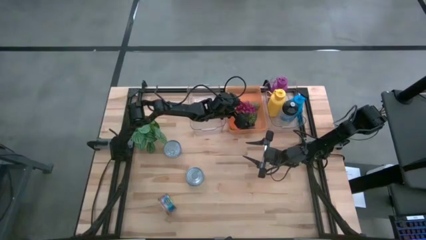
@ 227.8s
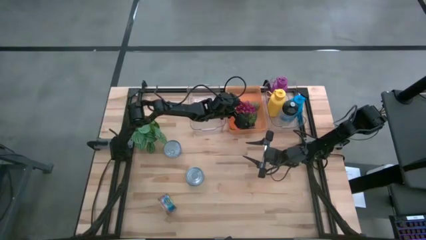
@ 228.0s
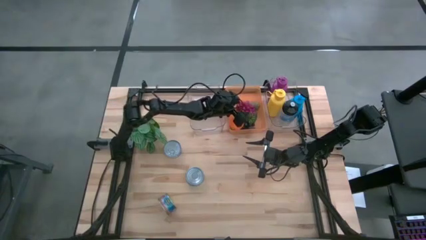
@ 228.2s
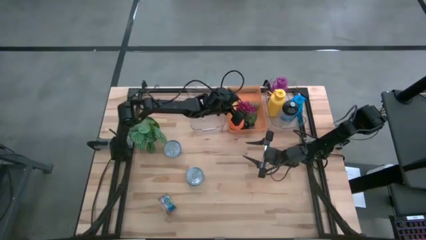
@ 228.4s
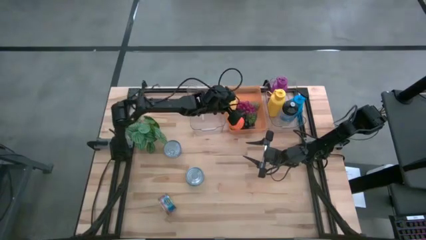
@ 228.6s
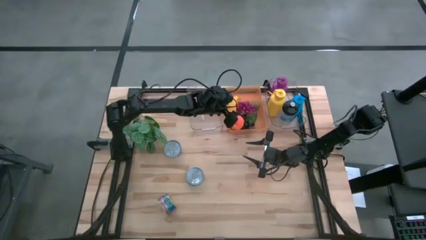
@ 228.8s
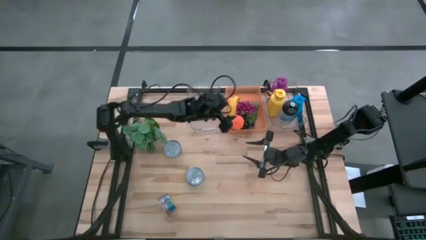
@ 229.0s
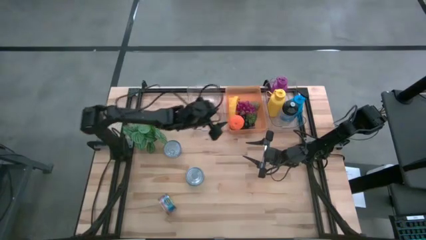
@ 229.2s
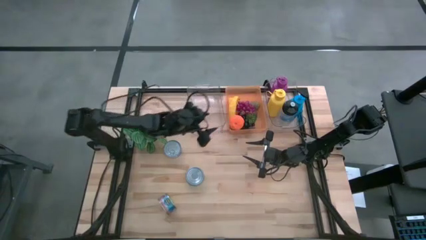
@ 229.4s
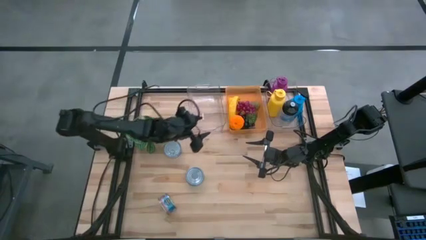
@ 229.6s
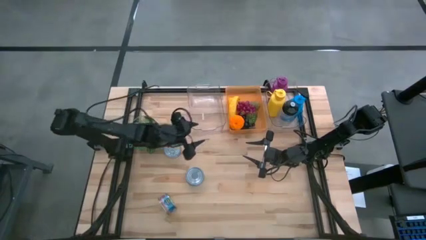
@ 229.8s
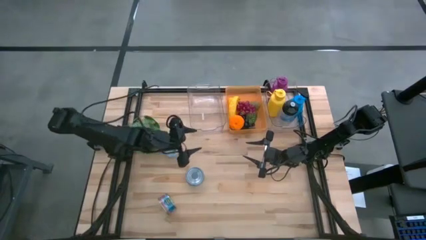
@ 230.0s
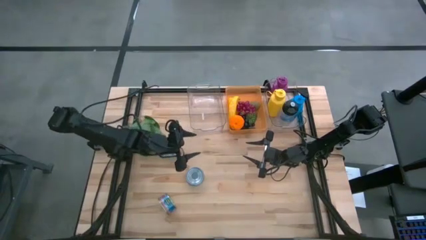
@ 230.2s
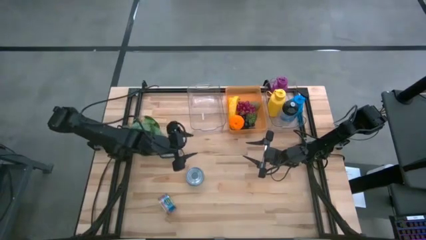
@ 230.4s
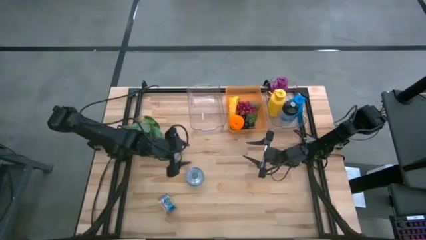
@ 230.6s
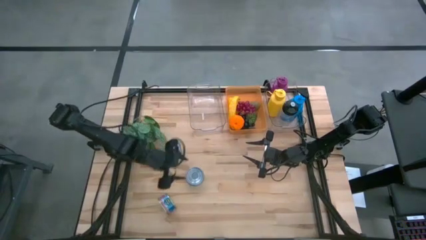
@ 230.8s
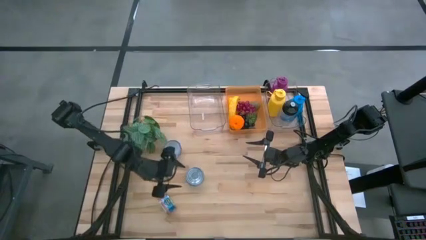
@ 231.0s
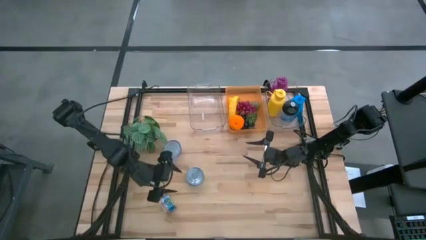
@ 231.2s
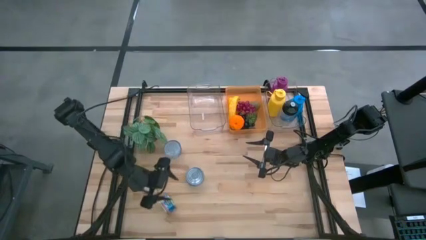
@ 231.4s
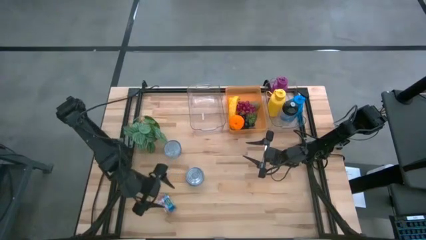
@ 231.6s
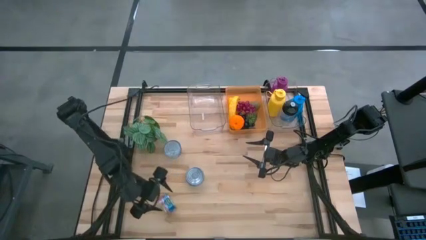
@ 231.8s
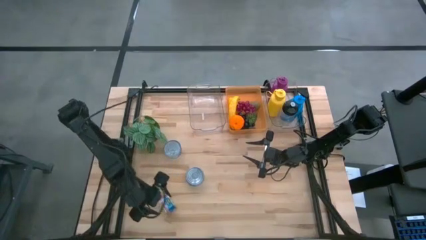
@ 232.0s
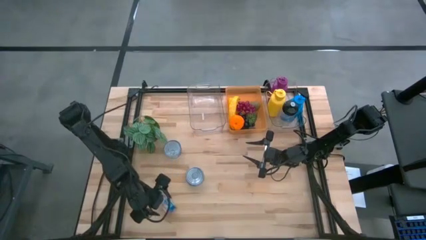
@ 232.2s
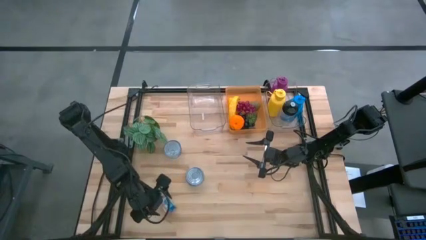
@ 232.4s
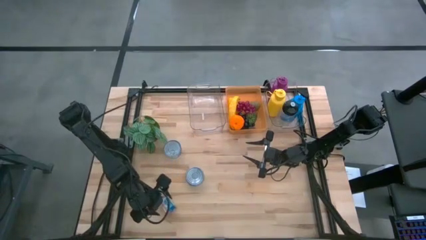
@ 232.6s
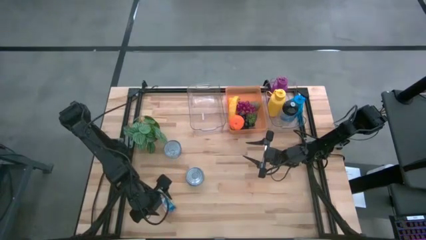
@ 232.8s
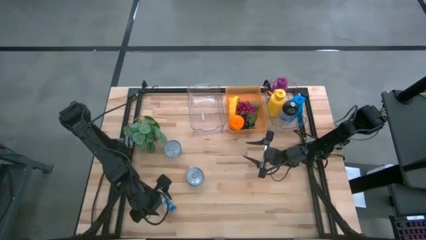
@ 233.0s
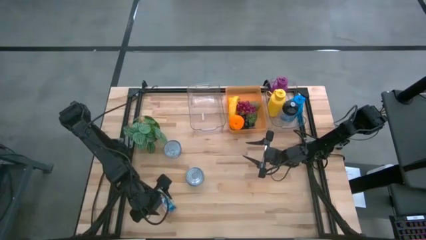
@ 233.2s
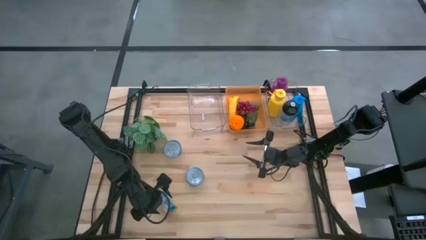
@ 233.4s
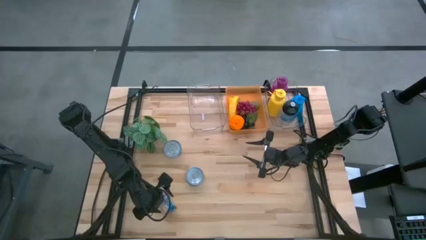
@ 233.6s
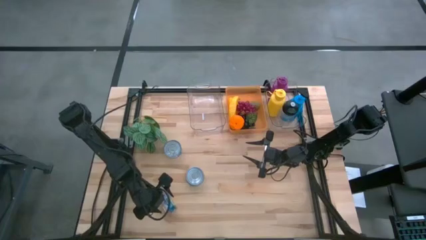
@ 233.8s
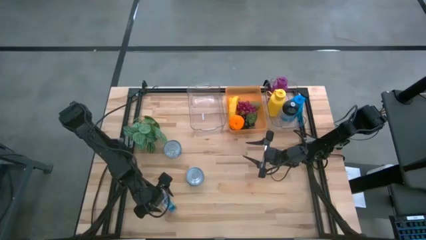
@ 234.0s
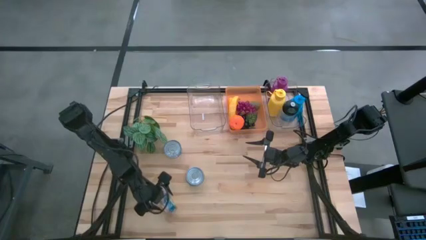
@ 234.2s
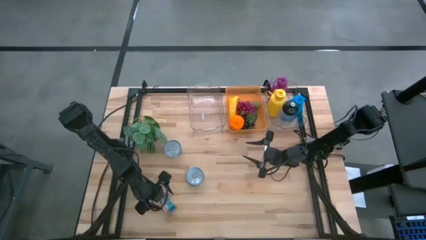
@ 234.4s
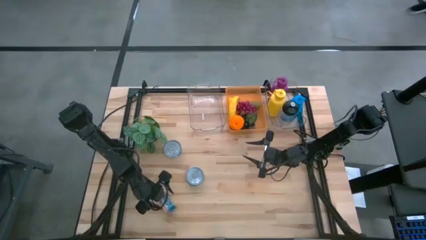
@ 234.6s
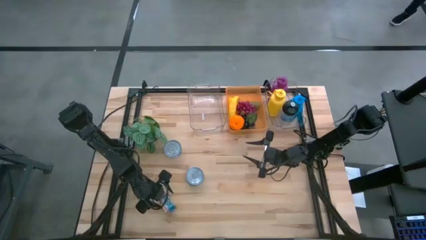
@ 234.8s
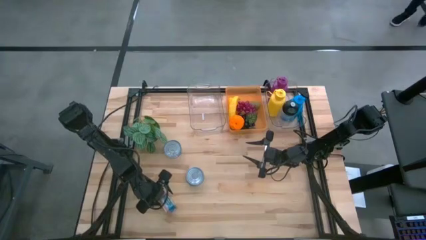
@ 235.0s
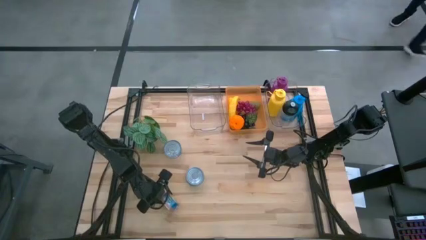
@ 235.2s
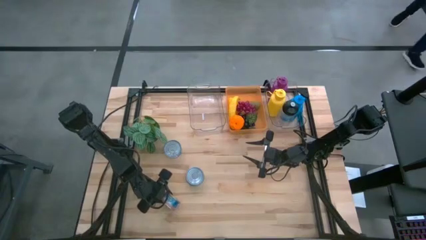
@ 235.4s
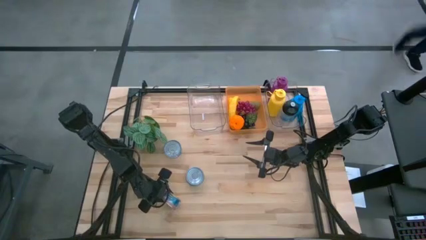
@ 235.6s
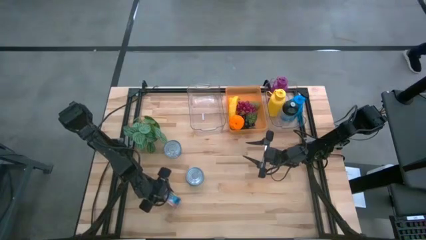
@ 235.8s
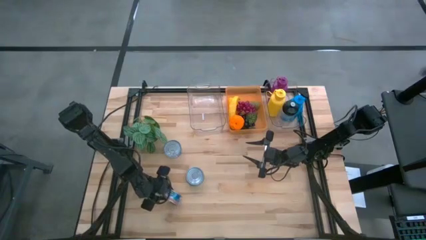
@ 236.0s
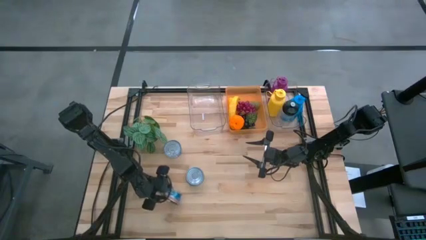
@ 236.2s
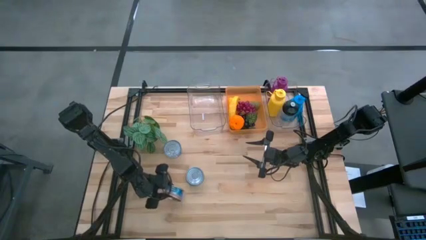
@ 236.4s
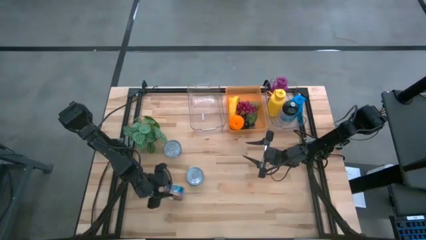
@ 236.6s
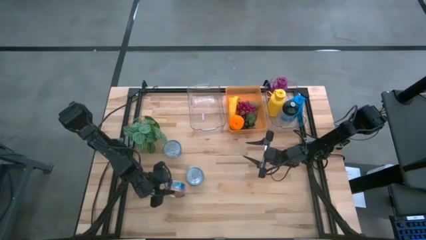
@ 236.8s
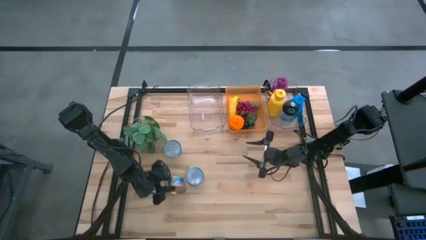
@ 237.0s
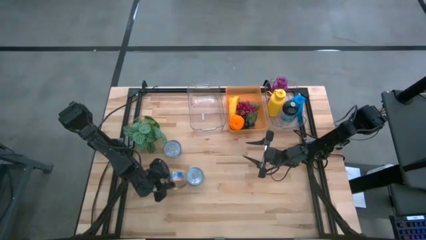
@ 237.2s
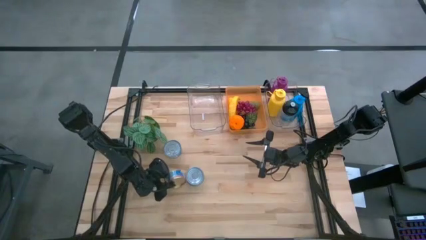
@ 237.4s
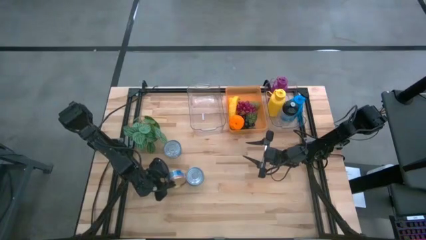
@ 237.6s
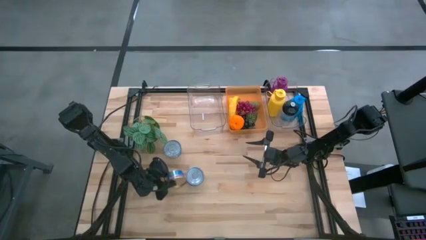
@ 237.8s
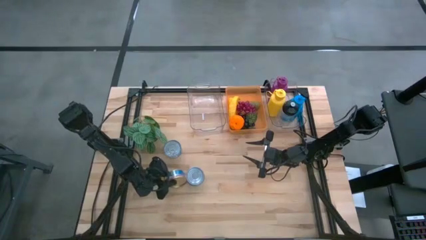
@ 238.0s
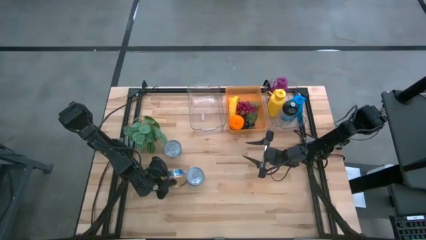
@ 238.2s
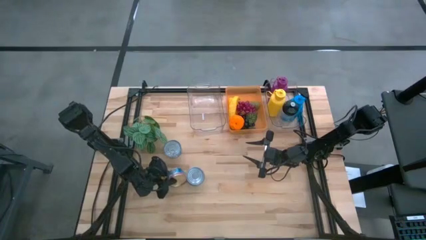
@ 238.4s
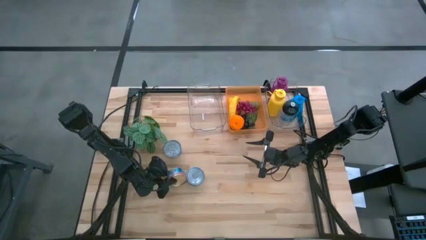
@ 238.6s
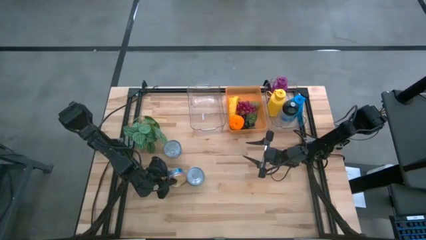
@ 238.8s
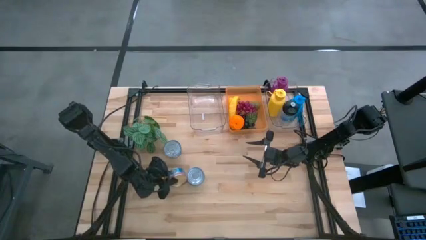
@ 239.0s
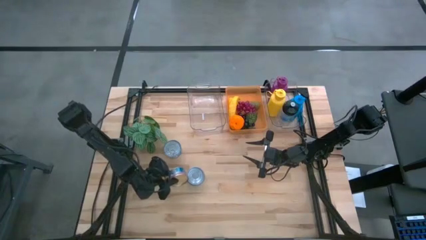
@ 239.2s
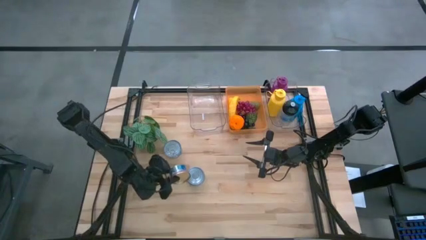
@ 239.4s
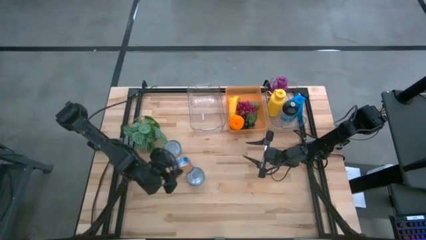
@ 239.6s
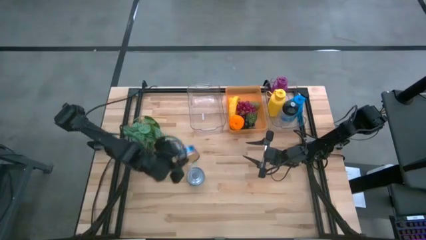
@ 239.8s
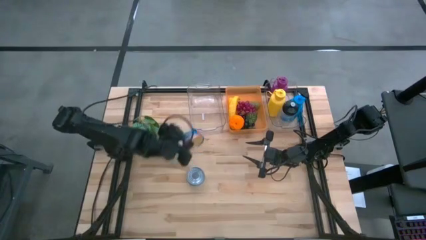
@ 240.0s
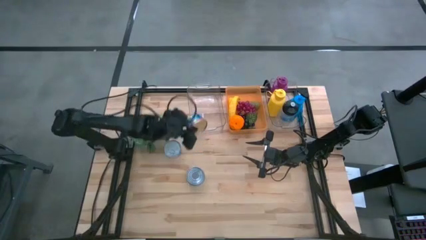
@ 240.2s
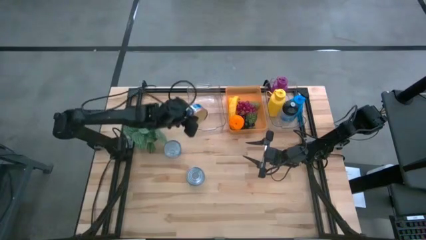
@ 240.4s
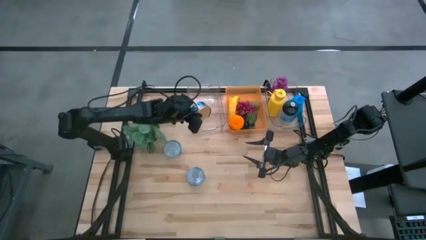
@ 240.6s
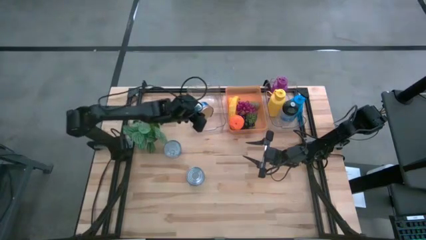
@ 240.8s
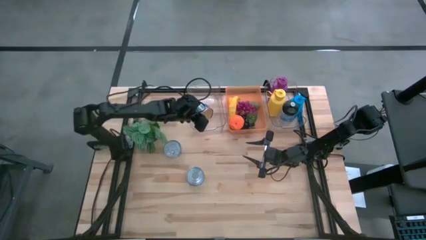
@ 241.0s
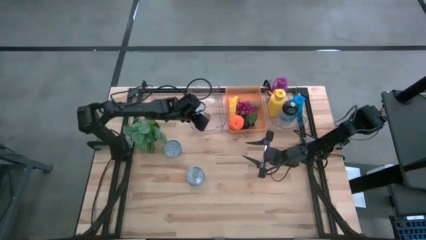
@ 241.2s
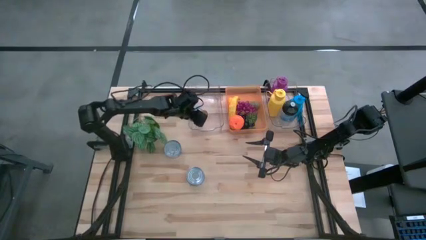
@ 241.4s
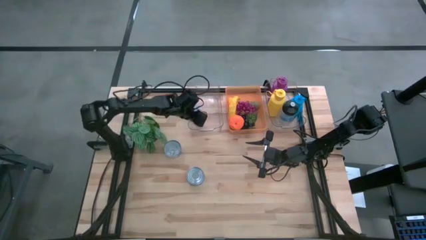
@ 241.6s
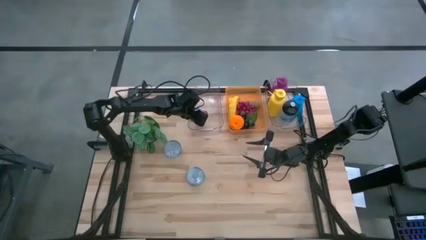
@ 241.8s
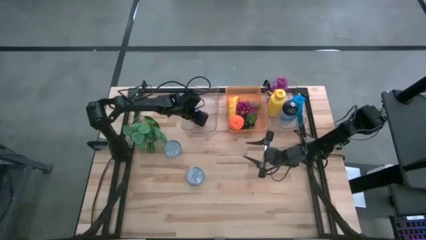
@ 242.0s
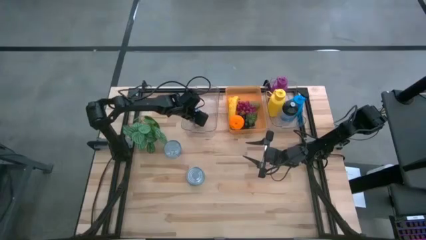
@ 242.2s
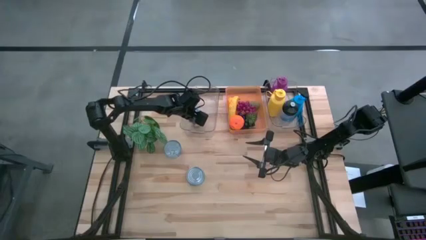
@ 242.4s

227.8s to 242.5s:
Task: Pick & Place Food Item
Put the blue and pink tuna can into the left transparent bin
